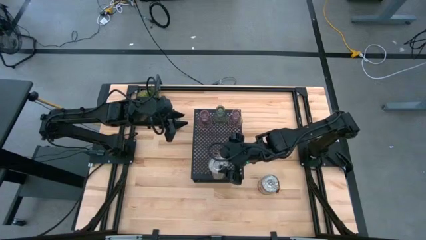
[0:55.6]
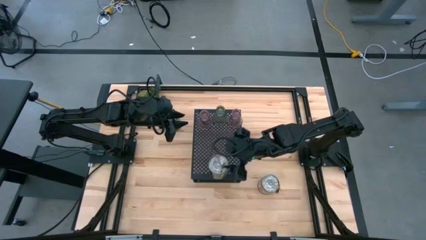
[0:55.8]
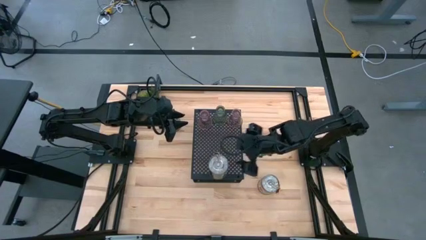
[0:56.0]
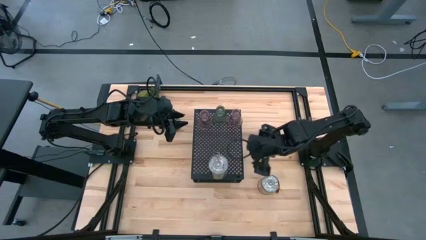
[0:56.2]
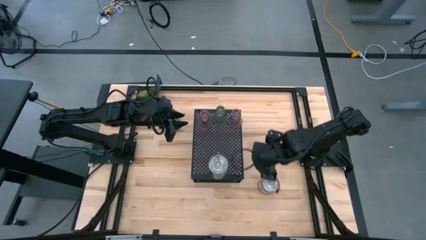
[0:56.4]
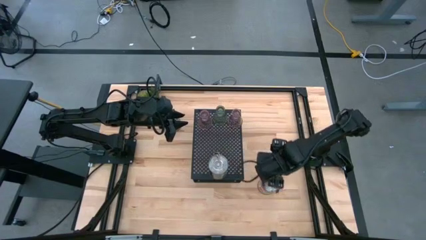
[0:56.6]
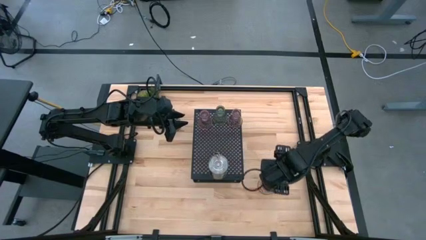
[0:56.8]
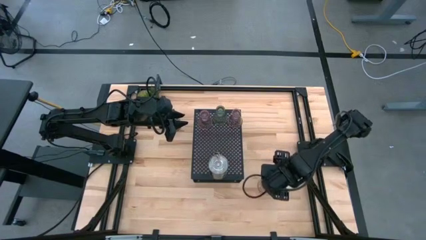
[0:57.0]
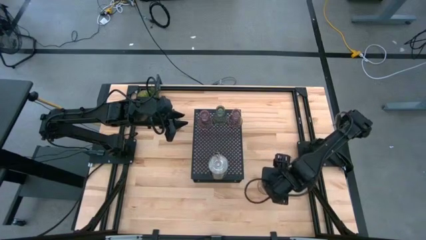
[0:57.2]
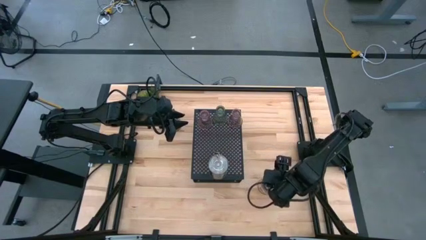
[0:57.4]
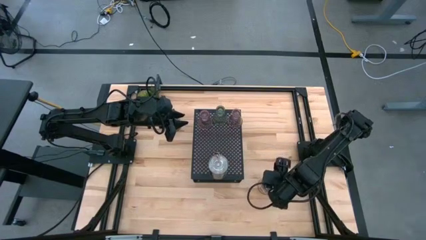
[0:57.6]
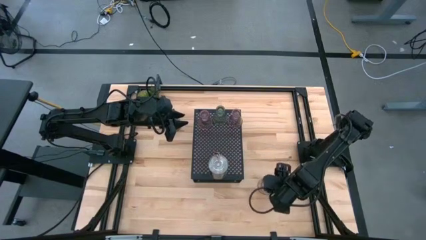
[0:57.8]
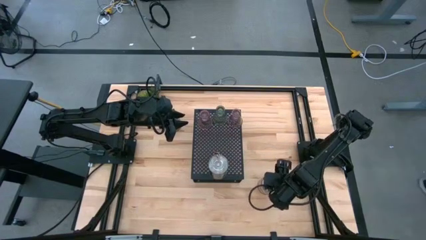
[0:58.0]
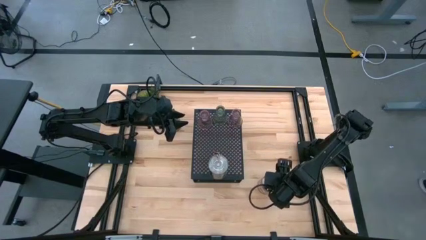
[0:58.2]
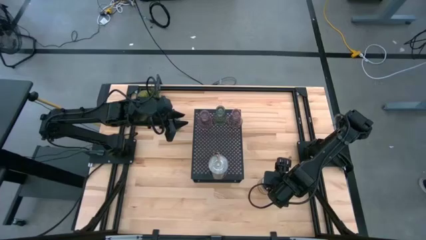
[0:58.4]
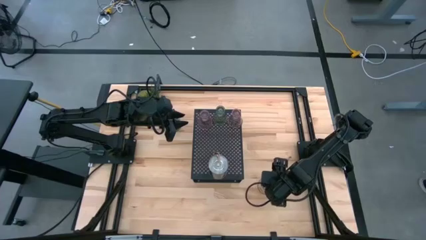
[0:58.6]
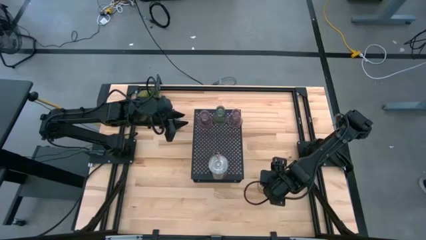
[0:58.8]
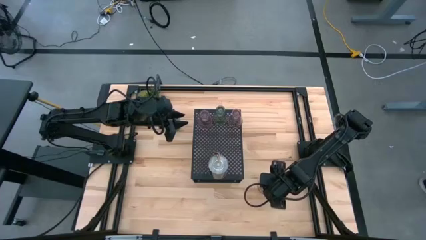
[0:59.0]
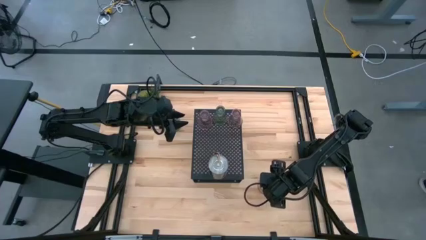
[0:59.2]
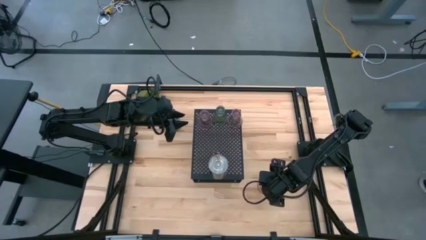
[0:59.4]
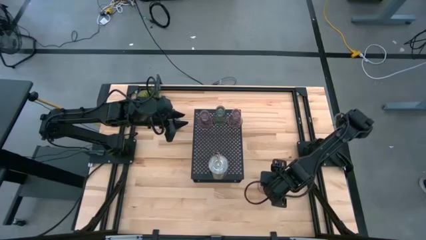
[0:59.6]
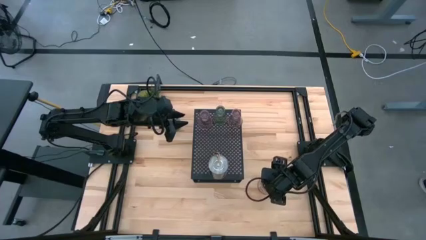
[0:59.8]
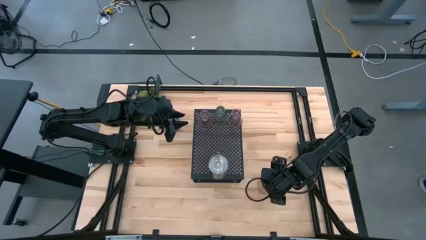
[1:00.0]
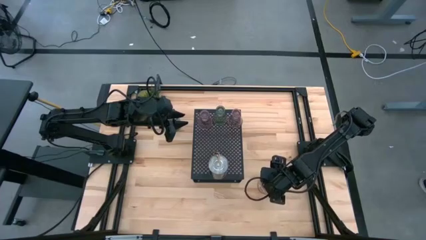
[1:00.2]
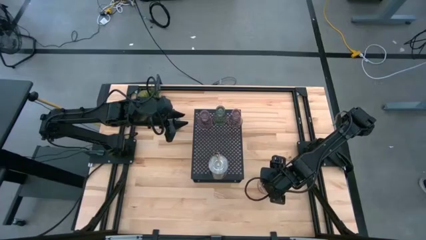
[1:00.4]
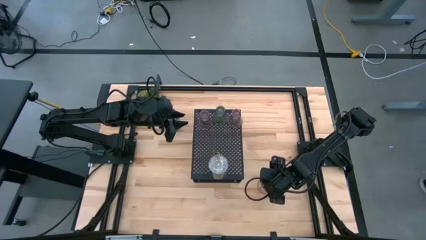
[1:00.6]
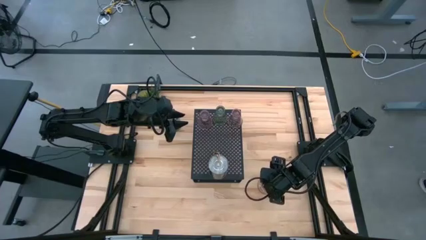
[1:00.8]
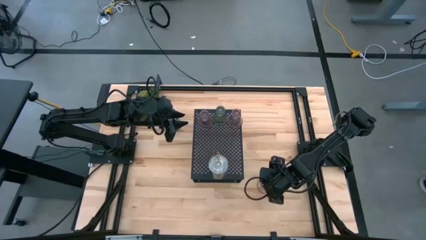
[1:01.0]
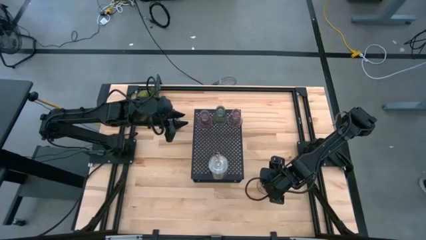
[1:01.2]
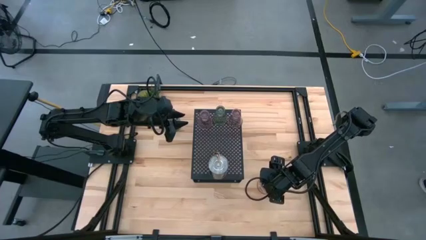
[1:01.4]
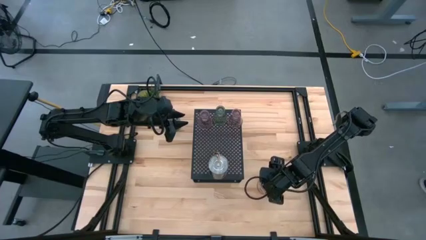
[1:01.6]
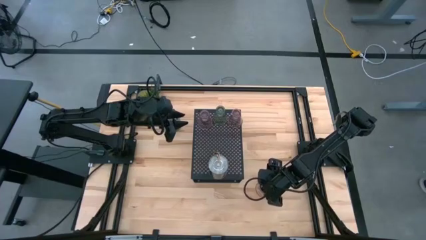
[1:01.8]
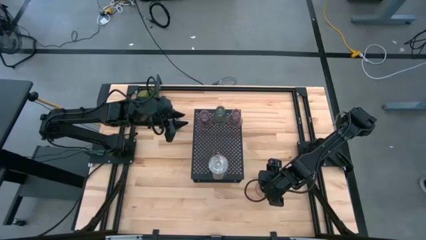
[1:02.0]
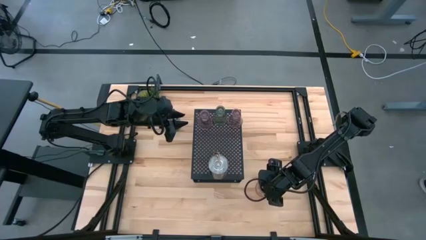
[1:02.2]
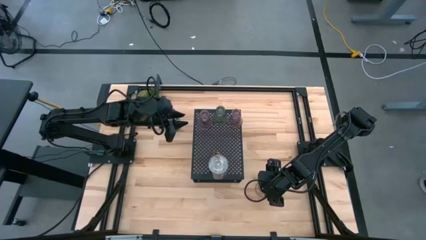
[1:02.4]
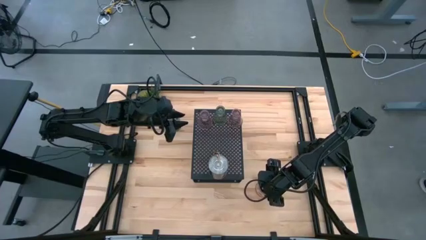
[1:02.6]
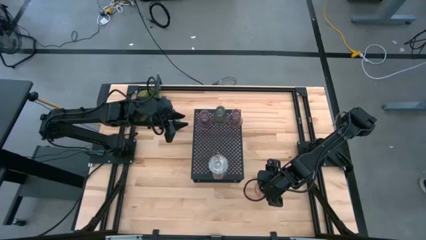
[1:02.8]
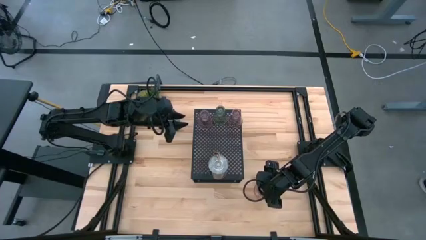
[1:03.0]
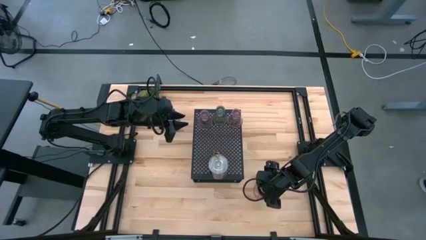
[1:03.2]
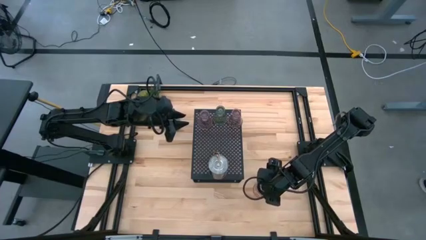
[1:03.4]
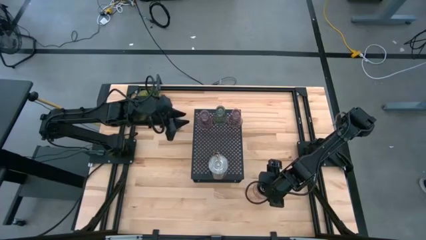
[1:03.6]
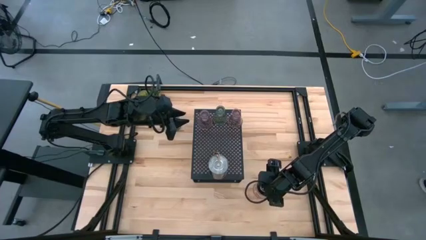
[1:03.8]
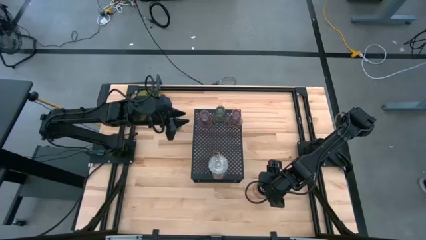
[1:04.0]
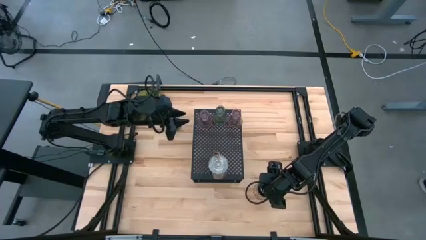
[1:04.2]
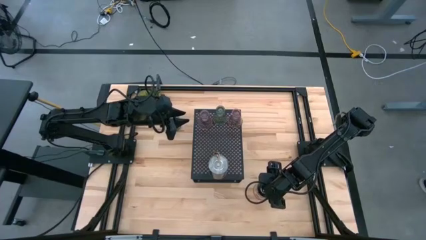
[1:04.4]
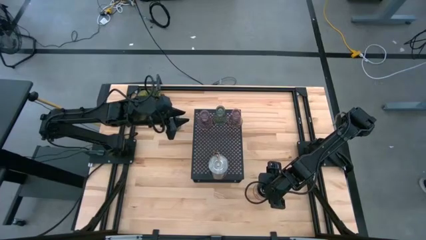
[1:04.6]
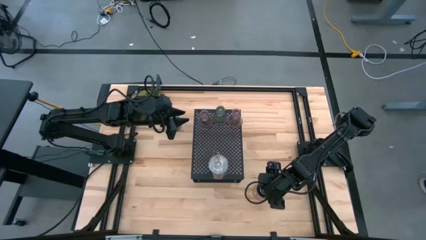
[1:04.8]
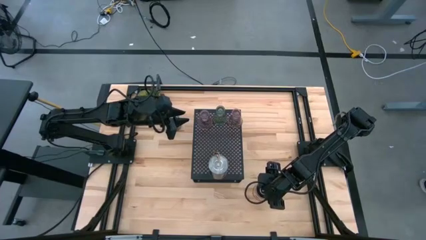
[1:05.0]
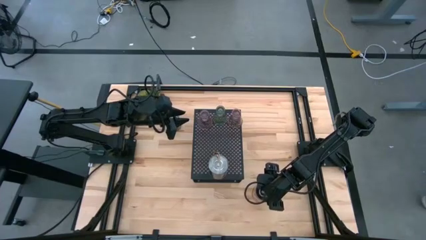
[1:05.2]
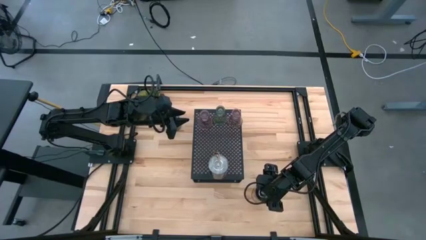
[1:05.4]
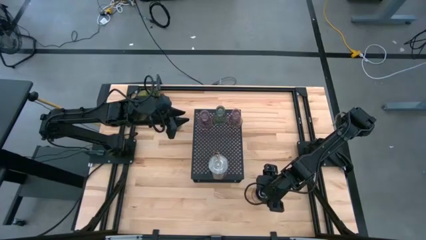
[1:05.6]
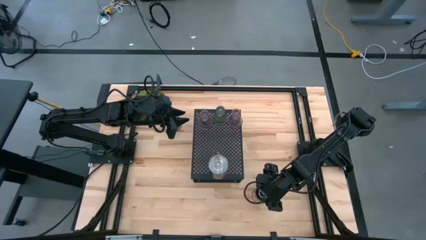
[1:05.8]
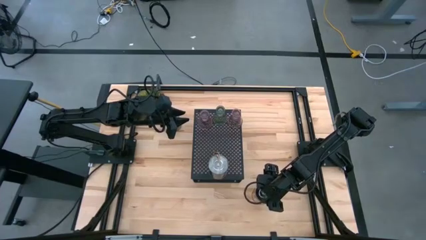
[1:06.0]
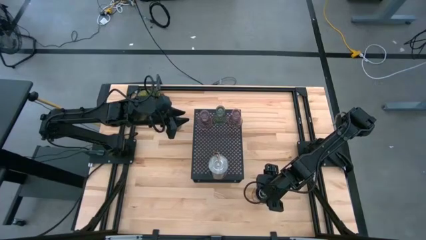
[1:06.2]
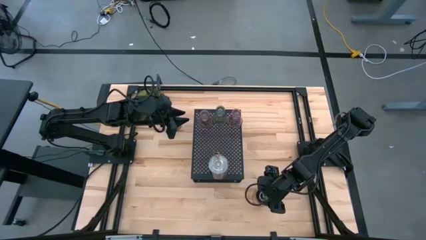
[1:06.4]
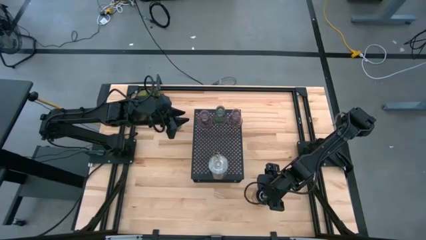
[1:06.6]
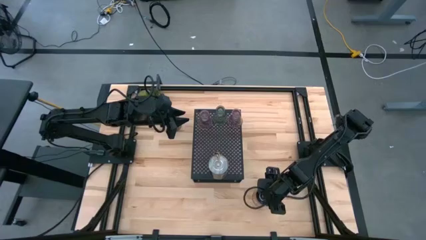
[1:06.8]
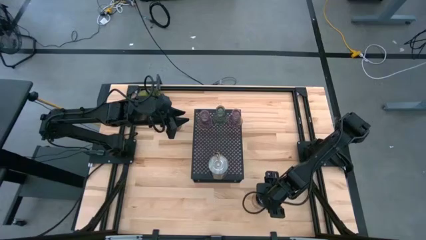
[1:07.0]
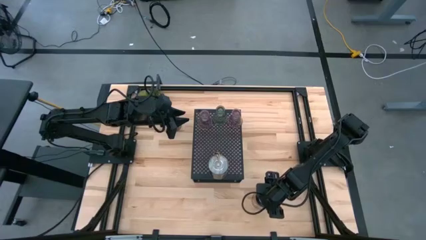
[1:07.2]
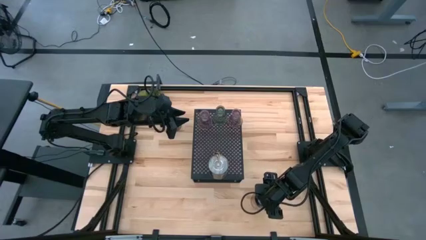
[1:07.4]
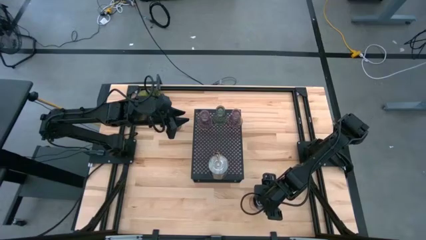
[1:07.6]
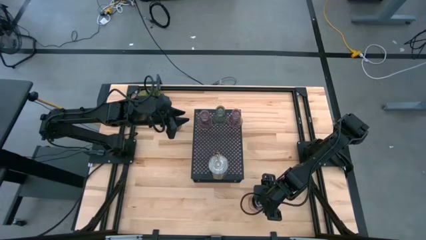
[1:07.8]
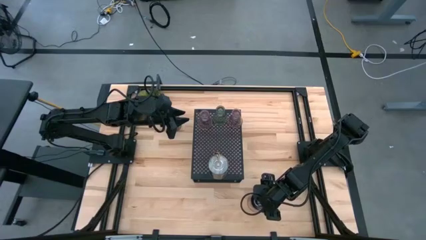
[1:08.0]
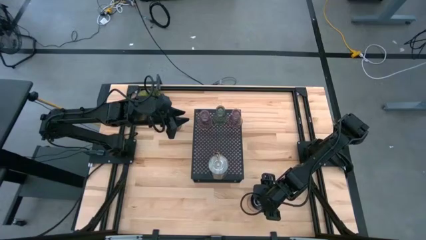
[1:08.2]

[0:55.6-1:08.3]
Task: Pick & Place candle stick holders
Put the orange scented candle on the shelf

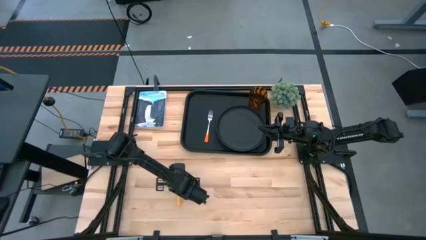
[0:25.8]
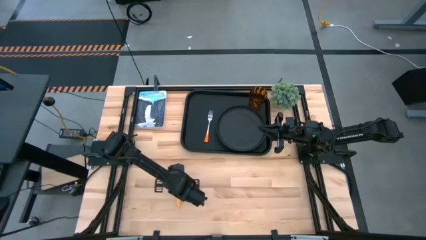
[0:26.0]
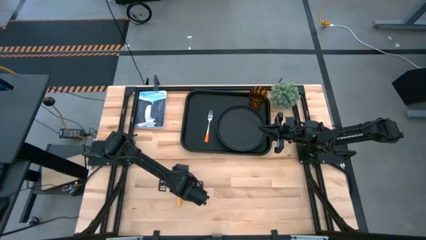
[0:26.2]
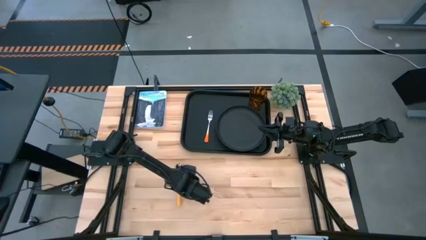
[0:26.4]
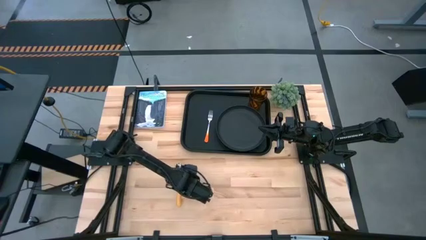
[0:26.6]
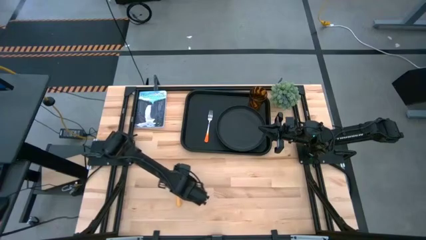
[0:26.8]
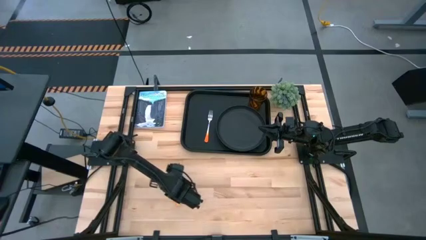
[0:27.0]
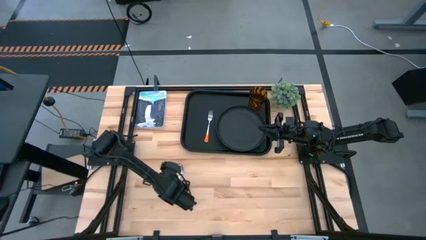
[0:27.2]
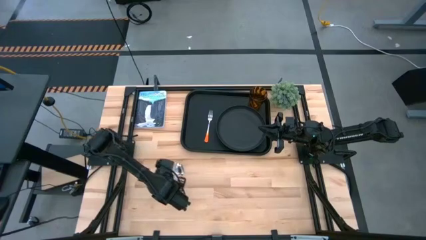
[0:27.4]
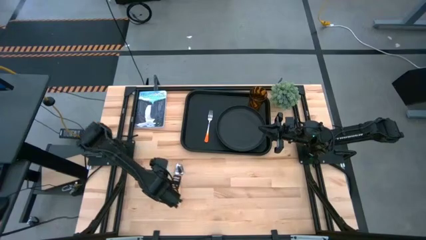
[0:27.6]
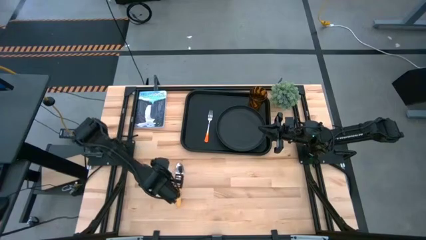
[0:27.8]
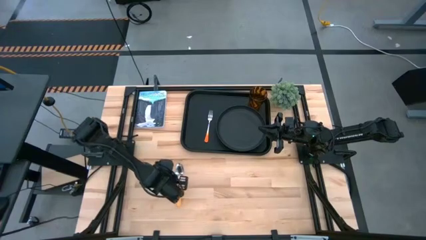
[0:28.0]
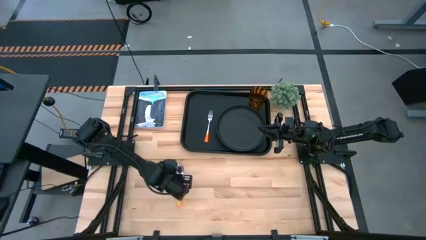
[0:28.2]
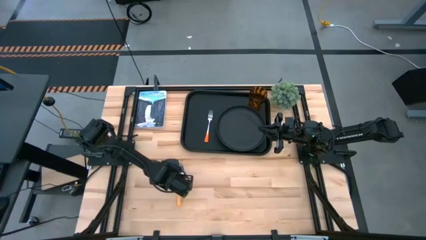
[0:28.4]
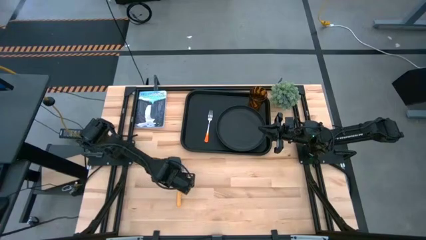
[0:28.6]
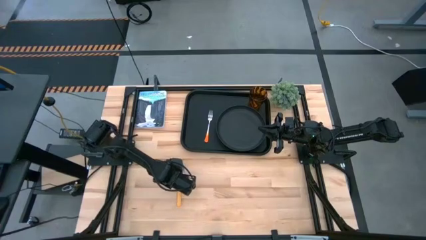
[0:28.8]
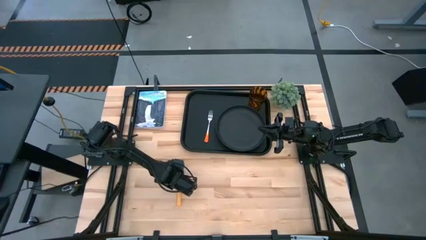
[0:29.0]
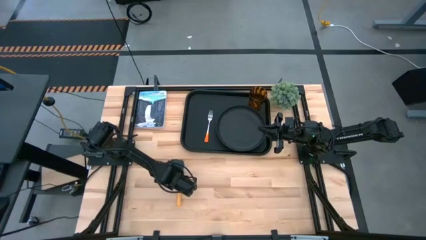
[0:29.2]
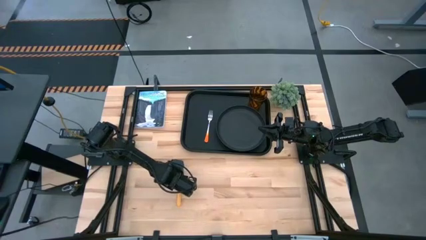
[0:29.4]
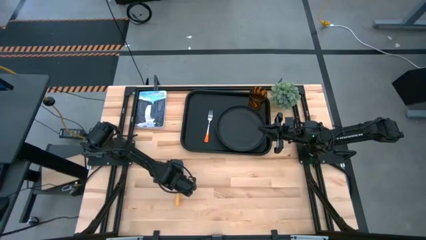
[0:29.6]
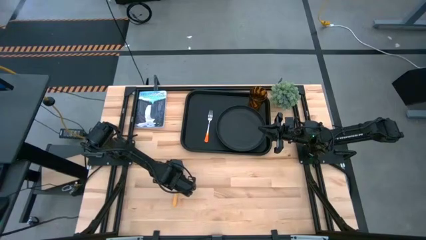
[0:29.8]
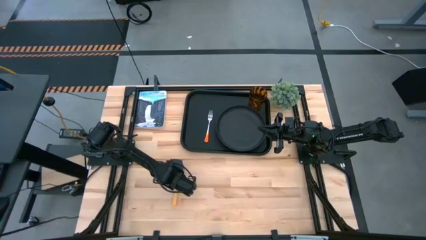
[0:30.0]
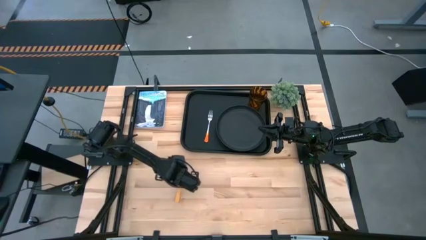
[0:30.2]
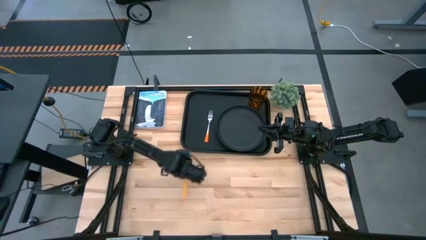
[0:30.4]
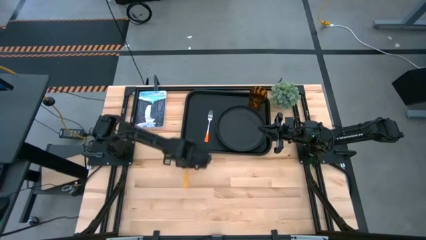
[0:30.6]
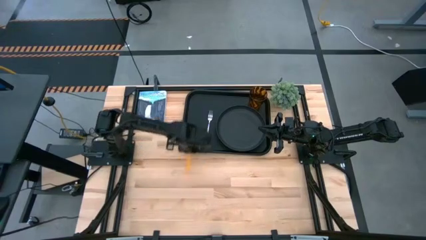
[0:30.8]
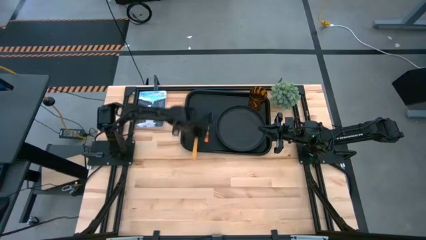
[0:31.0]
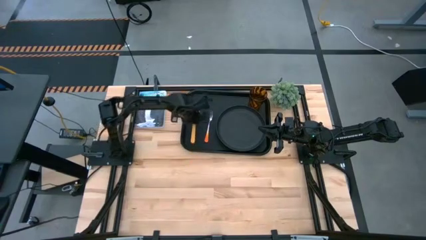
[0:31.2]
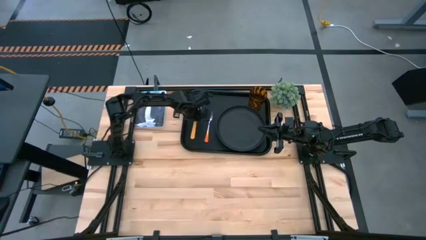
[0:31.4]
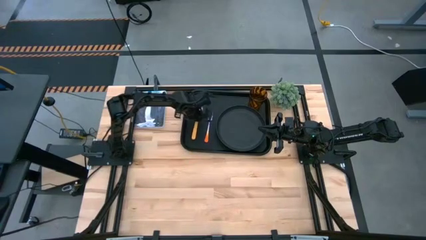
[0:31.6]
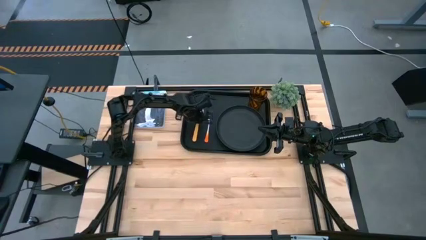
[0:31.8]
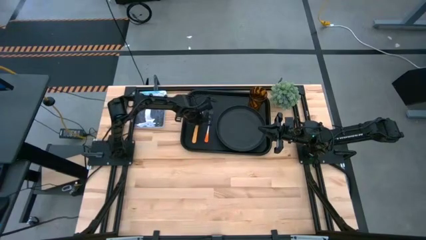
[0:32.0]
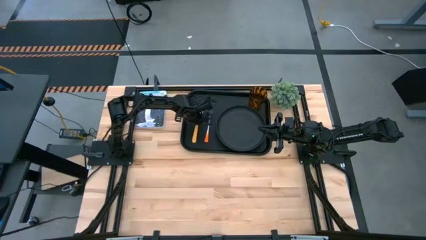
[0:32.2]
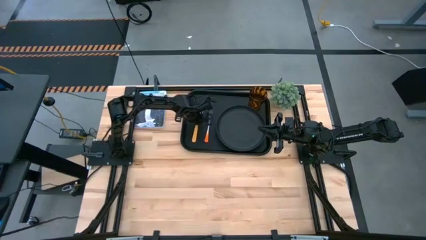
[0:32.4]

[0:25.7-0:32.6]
Task: Pick and place plate/cup/fork/spoon on tray
Put the yellow spoon on the black tray to the left of the orange fork
